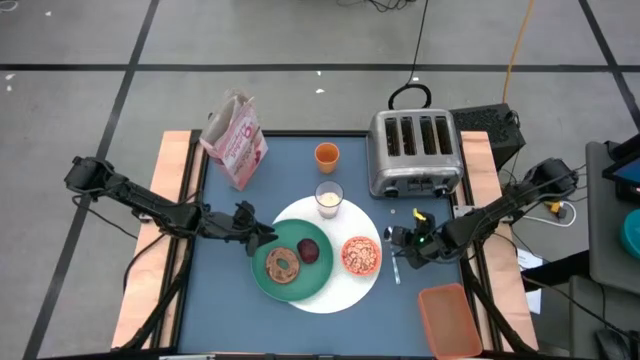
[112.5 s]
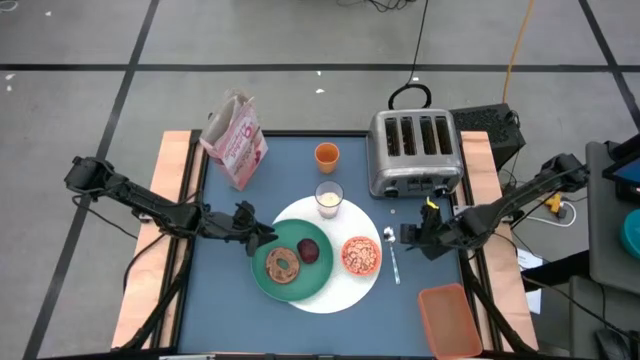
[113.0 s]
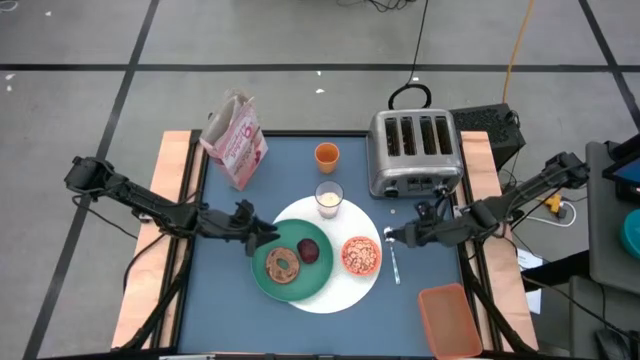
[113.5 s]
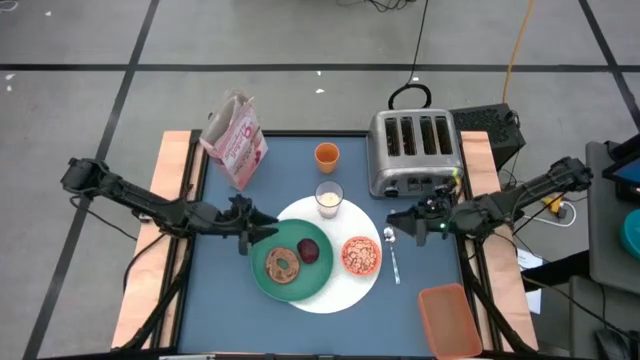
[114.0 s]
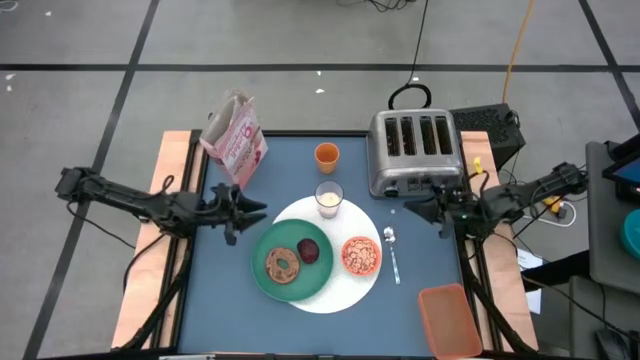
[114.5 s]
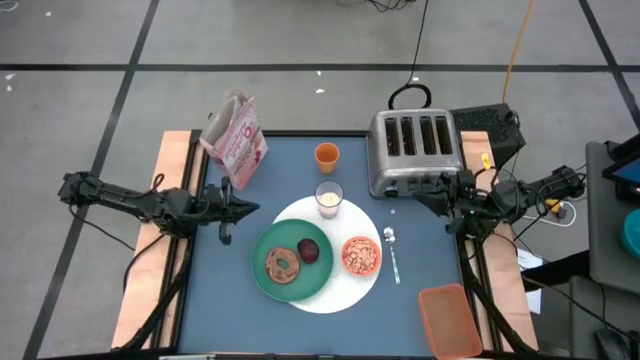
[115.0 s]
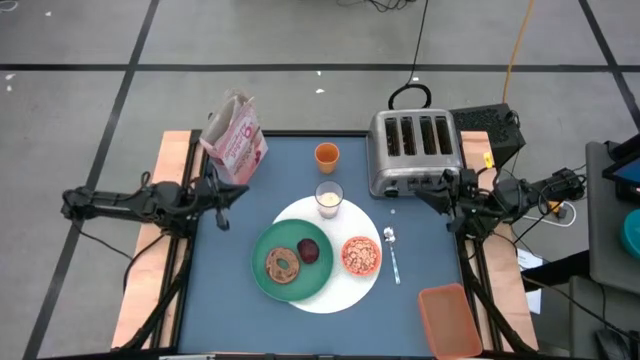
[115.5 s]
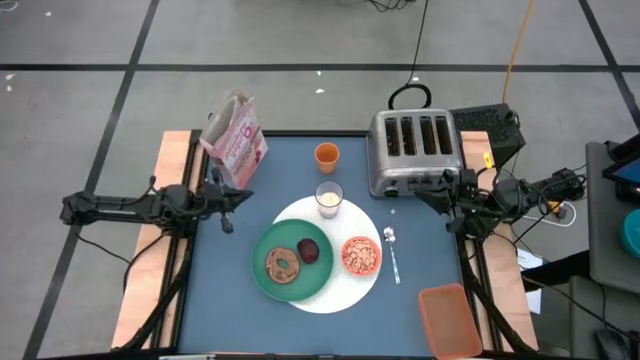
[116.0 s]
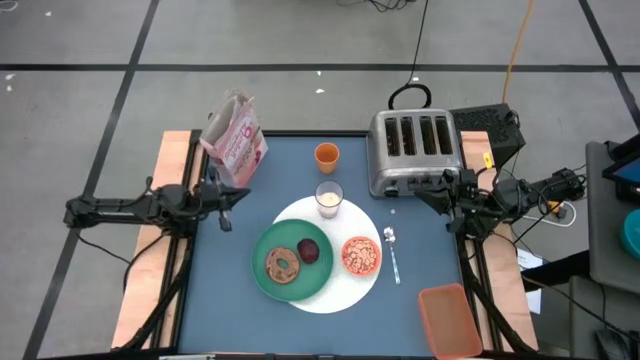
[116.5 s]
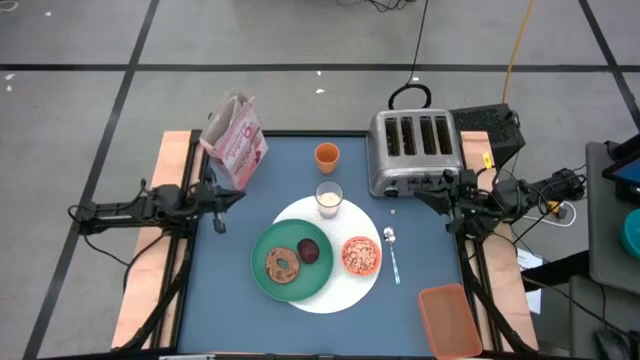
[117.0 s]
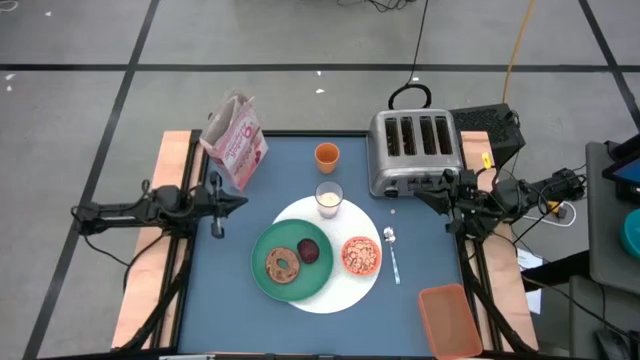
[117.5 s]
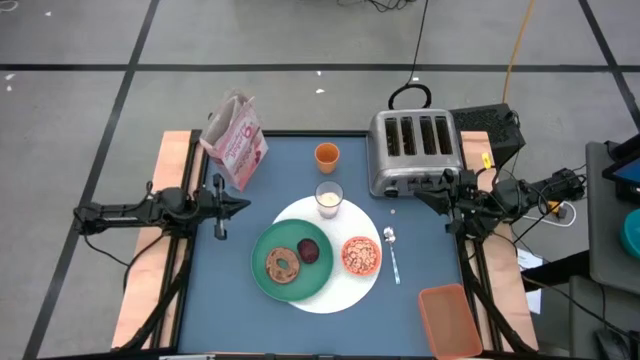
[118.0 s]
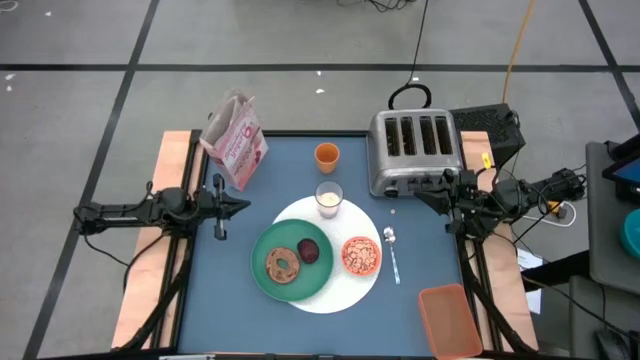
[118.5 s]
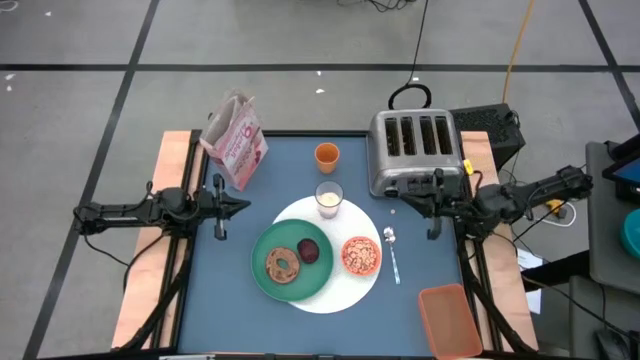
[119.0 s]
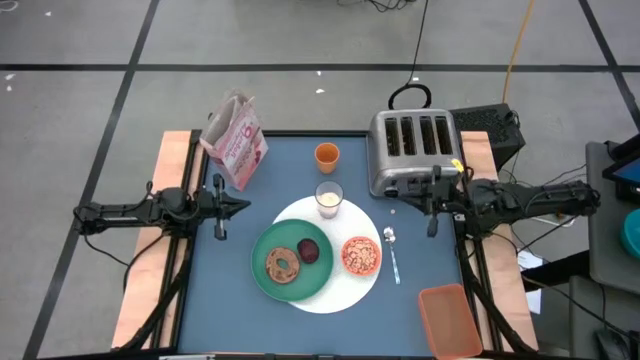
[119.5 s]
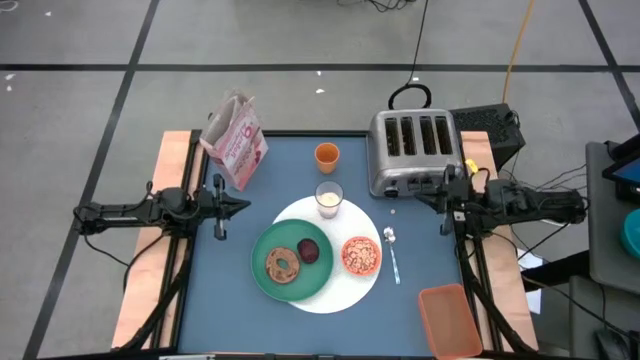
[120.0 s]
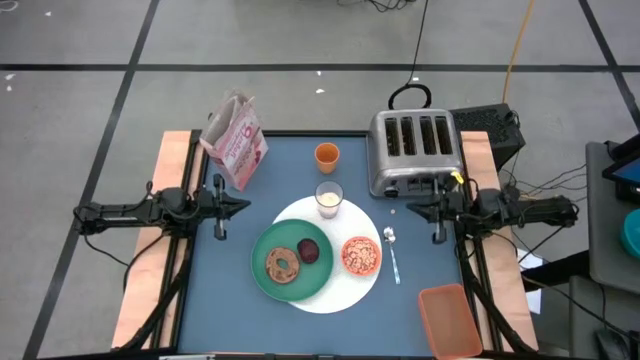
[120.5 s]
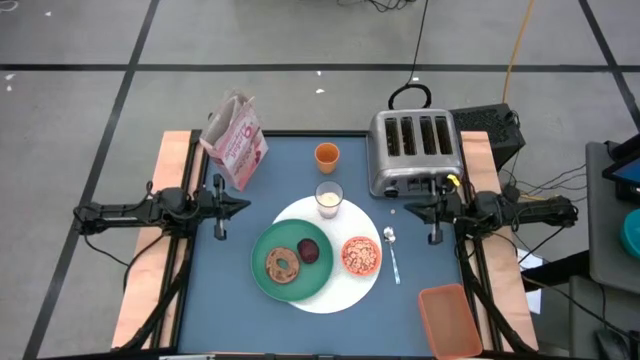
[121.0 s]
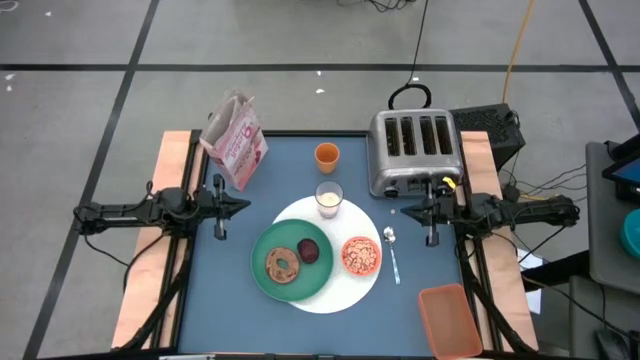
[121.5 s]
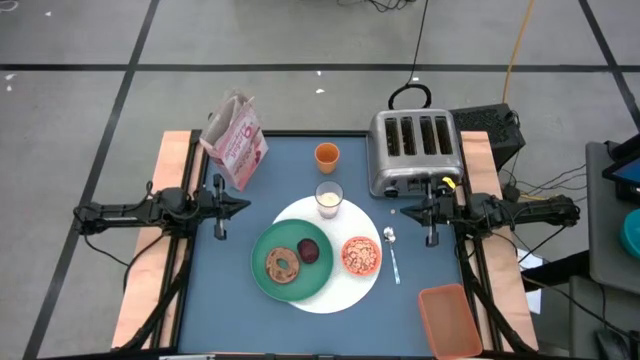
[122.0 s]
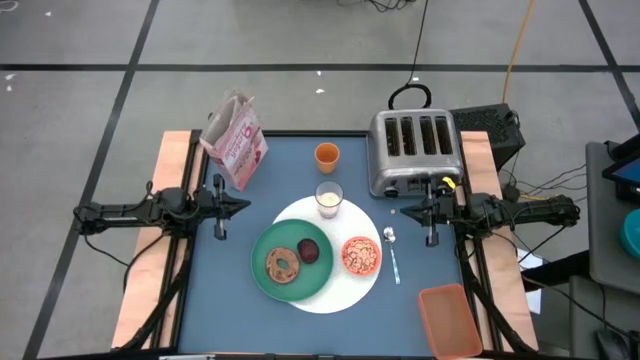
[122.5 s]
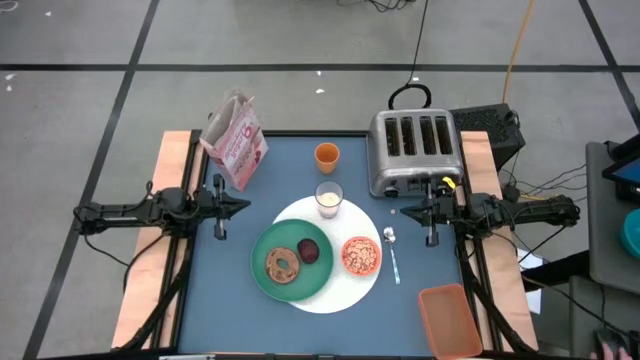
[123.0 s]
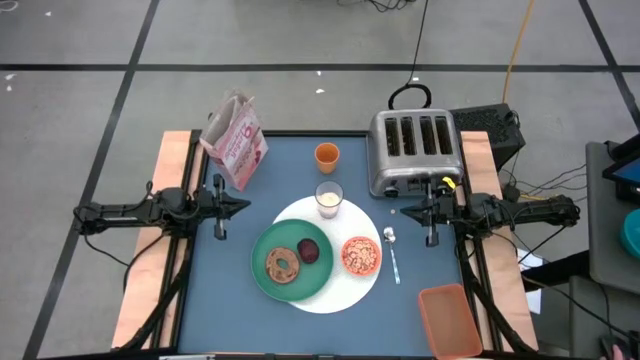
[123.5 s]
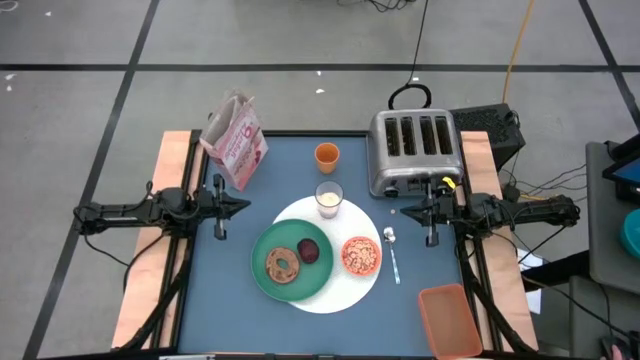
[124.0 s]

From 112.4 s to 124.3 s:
Task: Arrange a breakfast setting
Return to Home Position

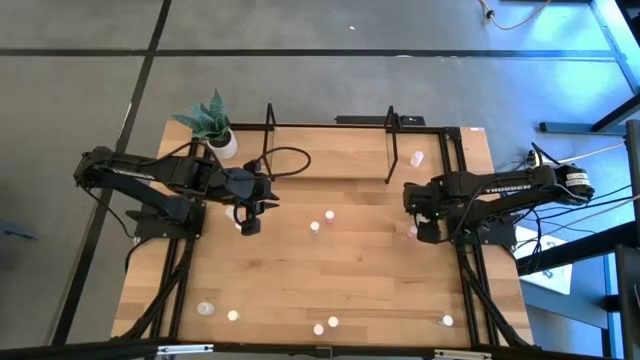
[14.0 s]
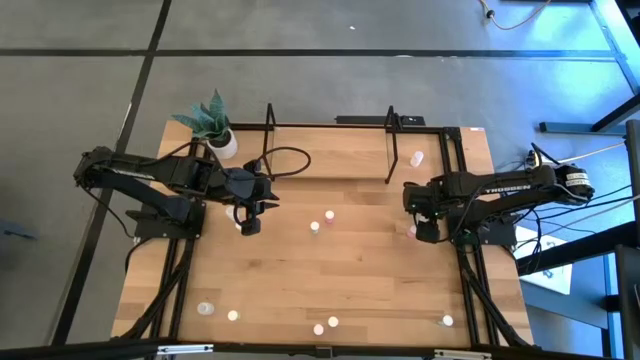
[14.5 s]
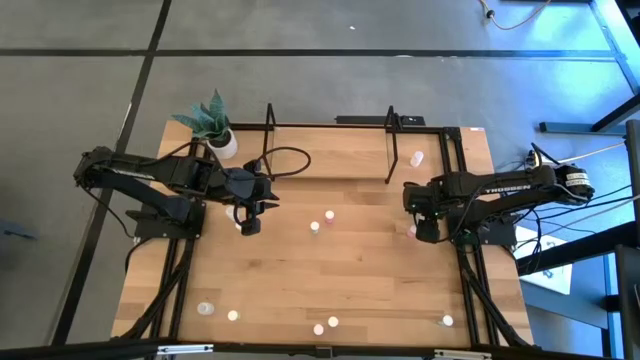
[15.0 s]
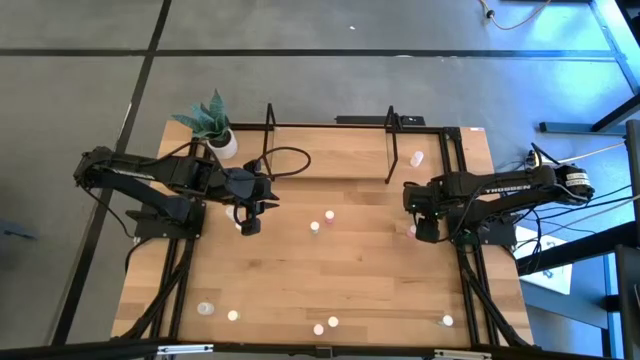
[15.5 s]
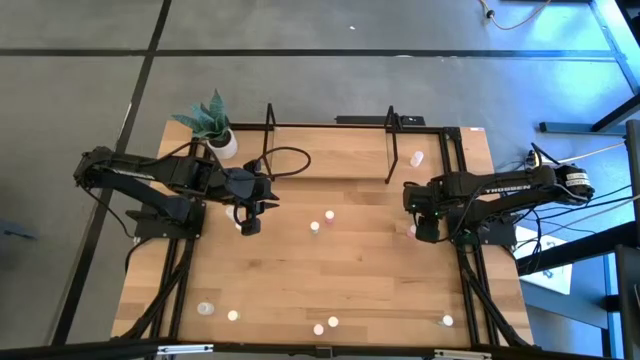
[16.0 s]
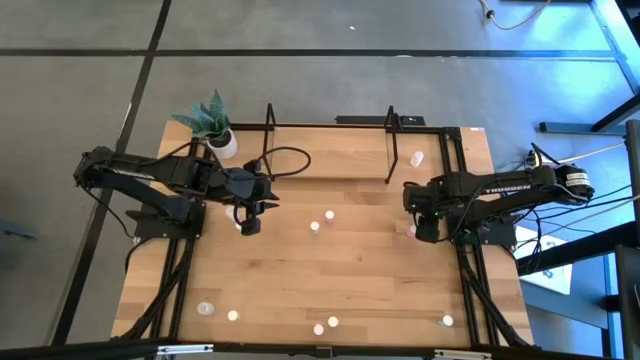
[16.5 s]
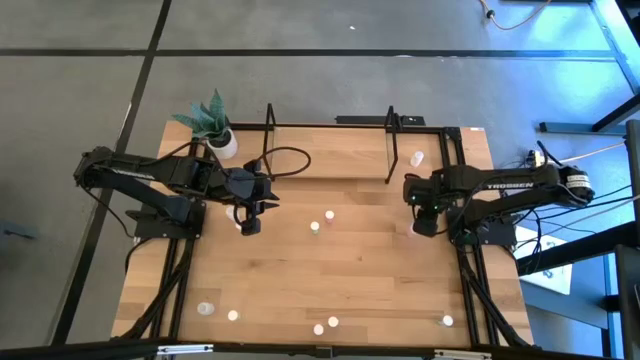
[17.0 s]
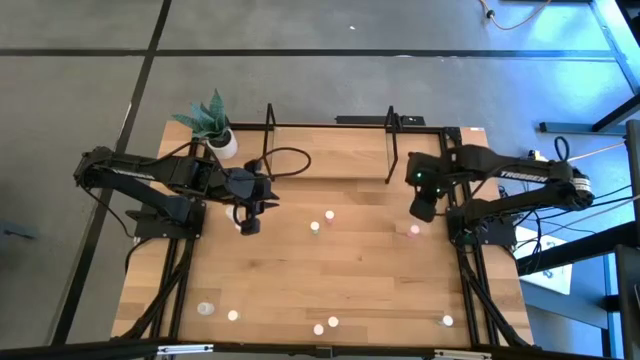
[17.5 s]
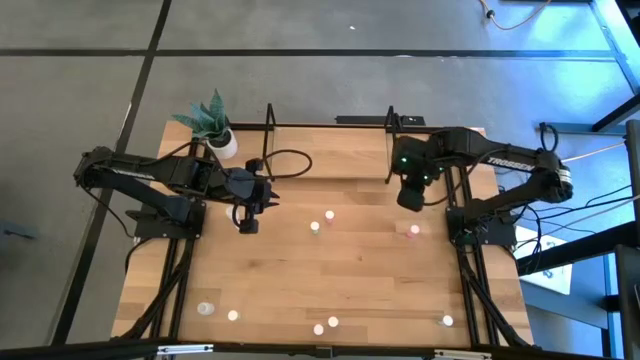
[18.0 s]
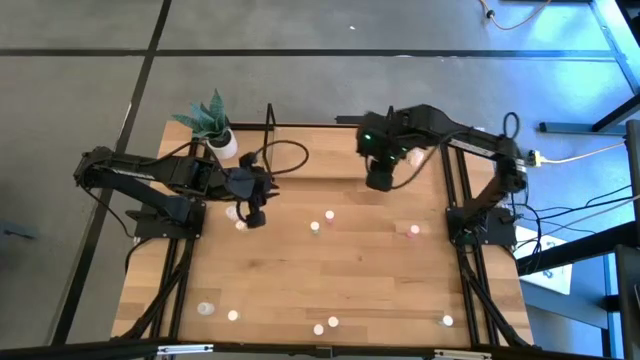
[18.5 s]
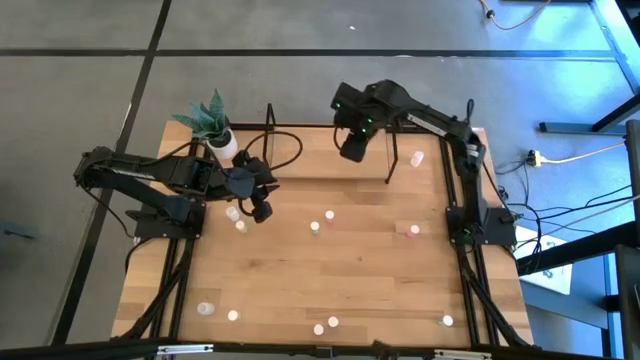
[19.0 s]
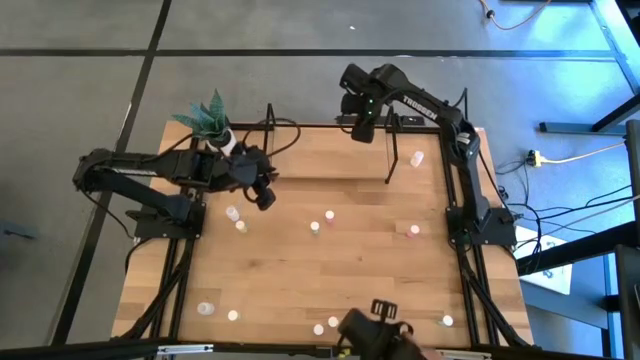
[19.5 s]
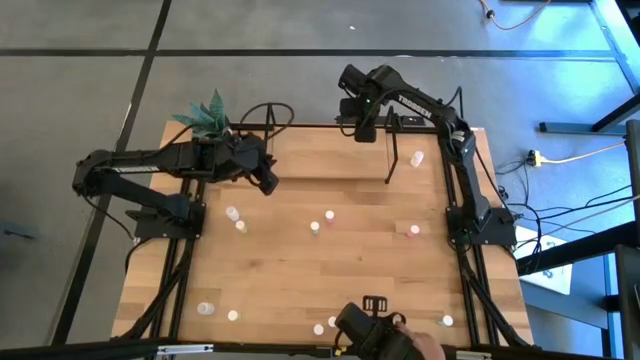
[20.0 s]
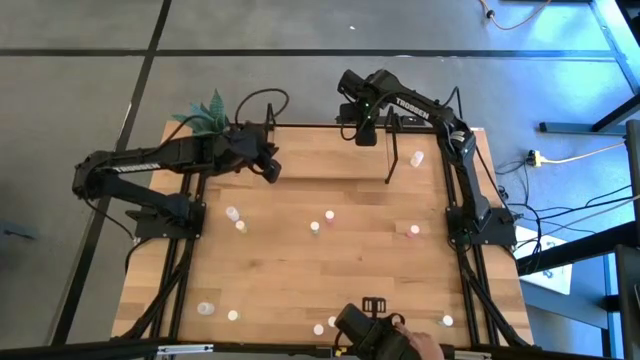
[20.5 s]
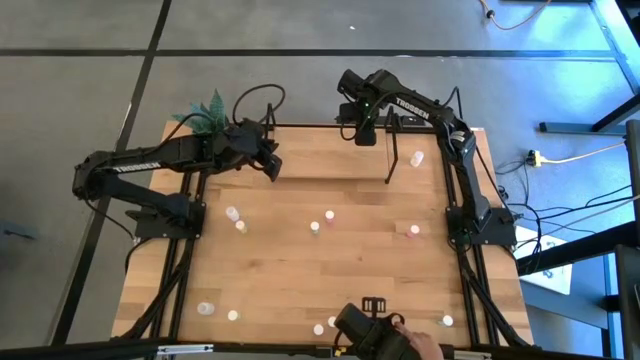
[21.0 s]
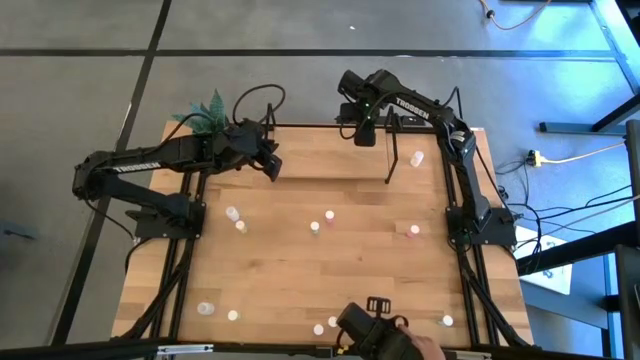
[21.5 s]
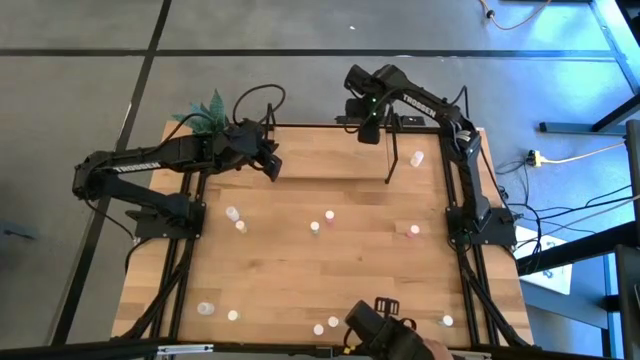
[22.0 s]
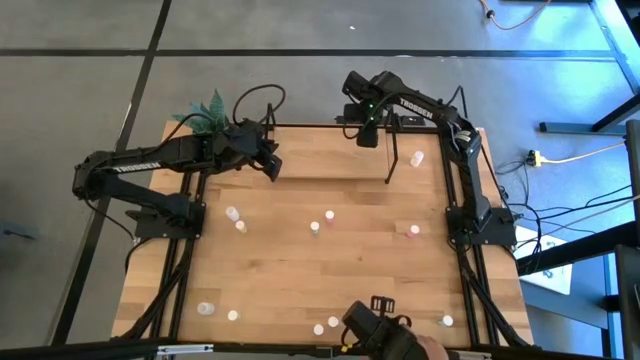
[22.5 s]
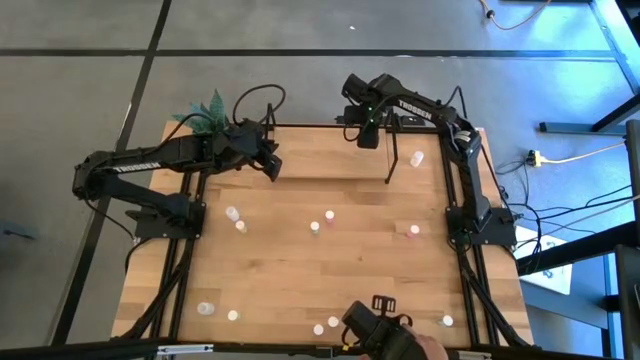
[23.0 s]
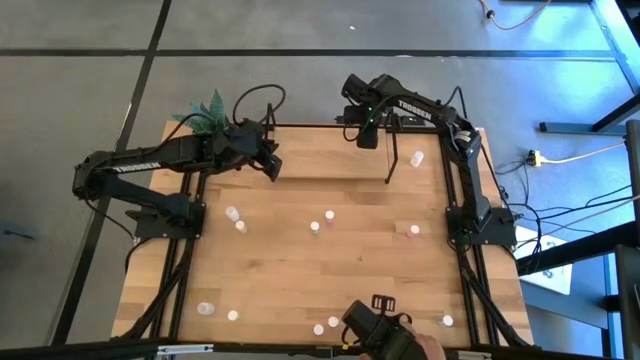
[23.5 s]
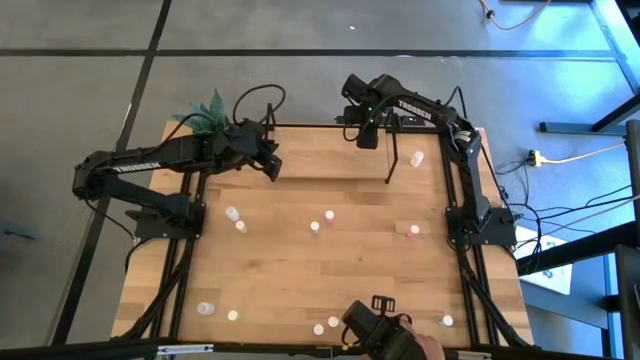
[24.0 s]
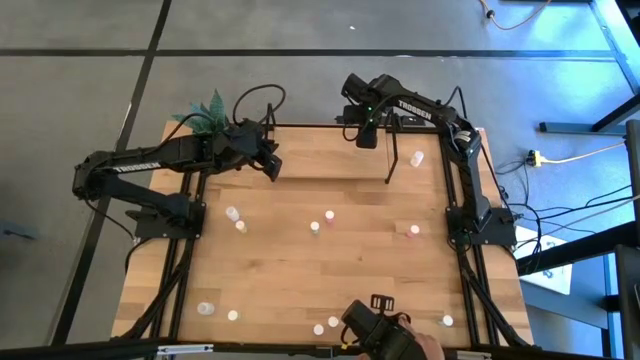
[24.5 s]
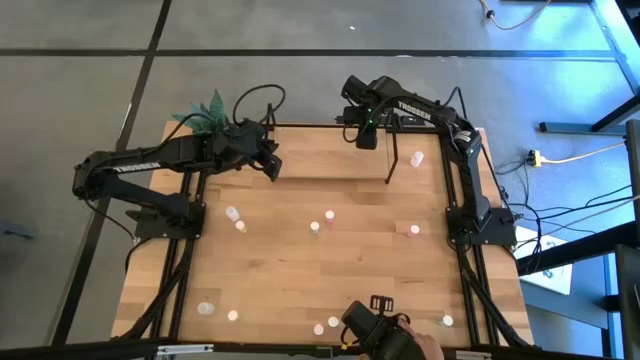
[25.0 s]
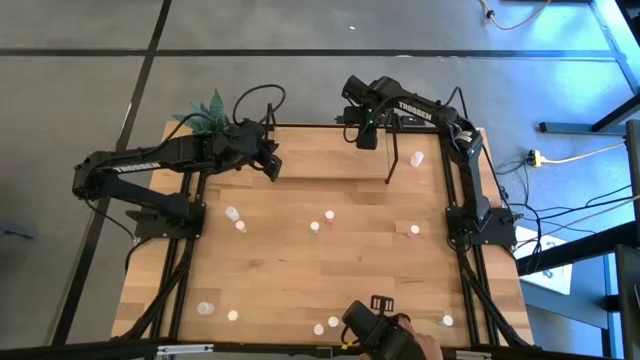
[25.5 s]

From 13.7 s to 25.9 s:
Task: Pick and place medicine bottles onto shelf by color
Put the top right blue pill bottle on the shelf
